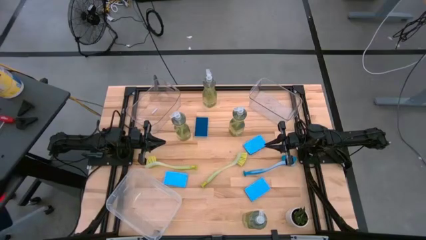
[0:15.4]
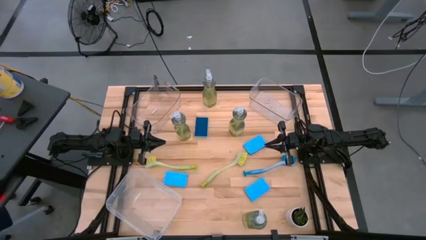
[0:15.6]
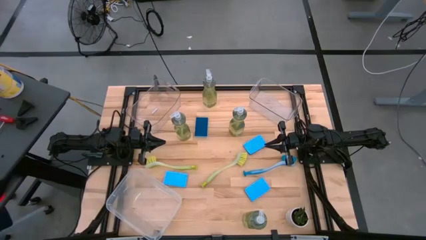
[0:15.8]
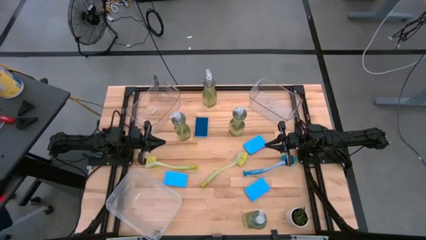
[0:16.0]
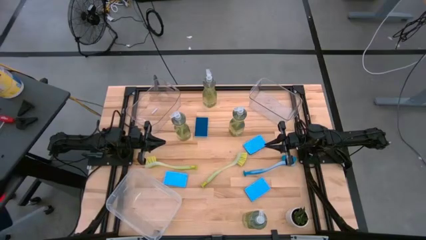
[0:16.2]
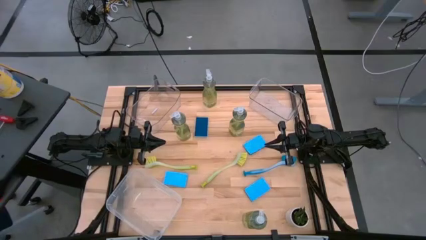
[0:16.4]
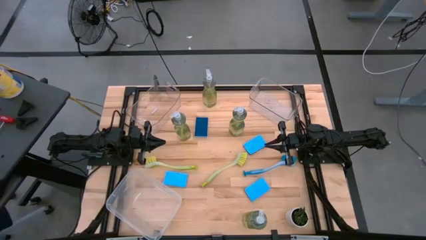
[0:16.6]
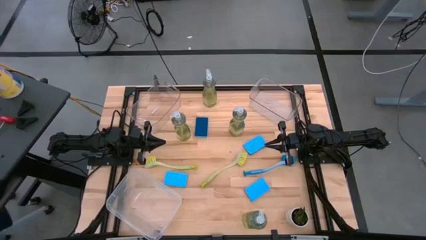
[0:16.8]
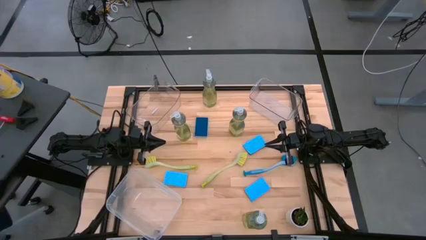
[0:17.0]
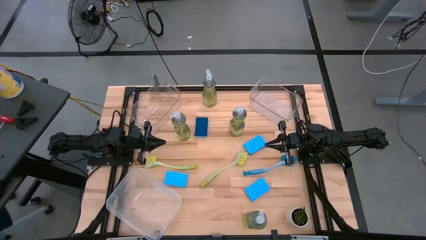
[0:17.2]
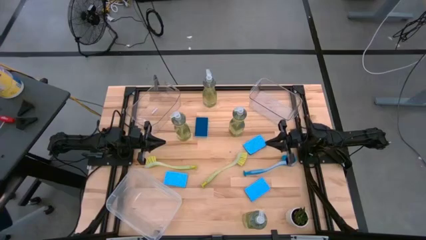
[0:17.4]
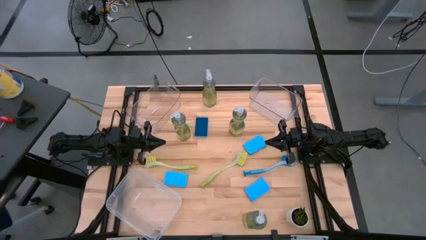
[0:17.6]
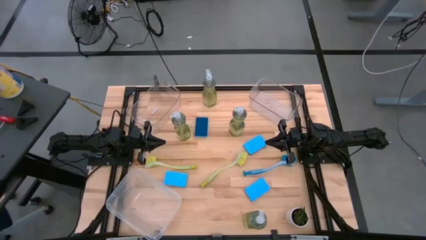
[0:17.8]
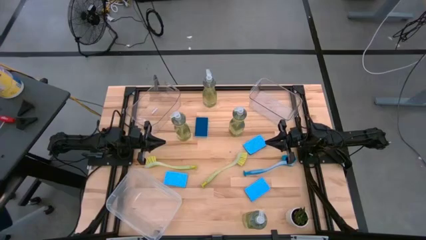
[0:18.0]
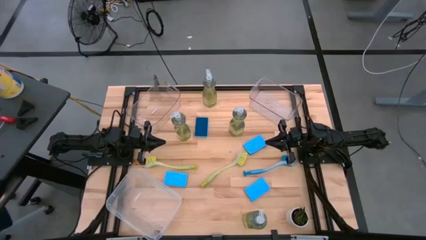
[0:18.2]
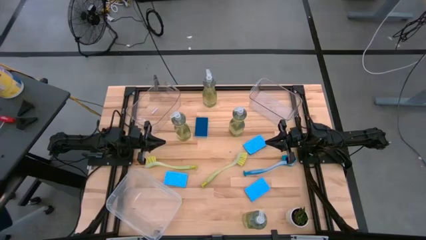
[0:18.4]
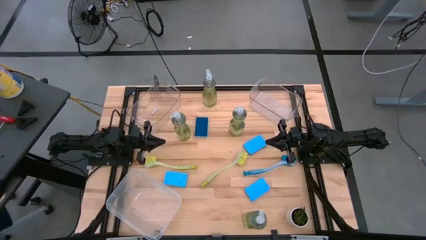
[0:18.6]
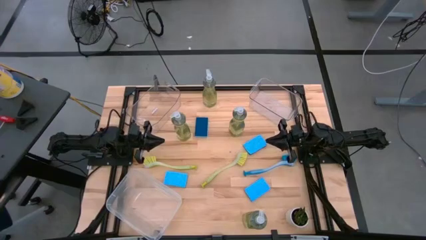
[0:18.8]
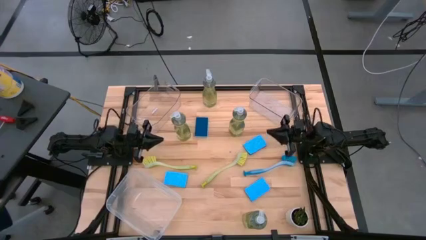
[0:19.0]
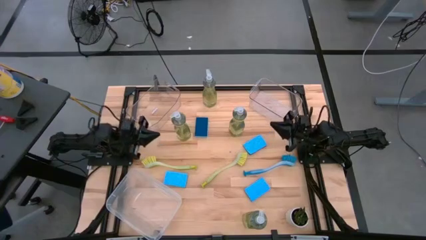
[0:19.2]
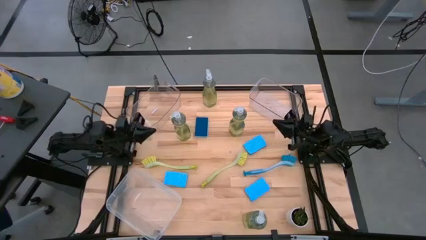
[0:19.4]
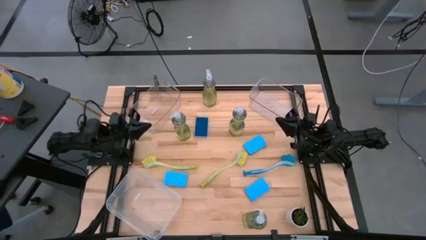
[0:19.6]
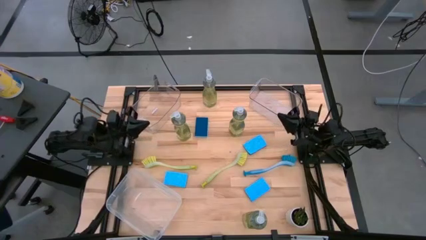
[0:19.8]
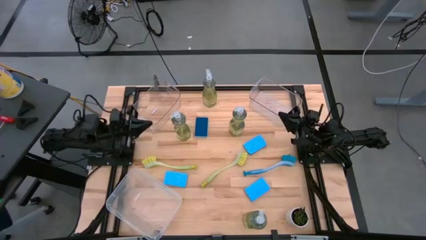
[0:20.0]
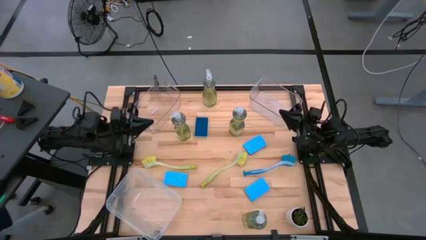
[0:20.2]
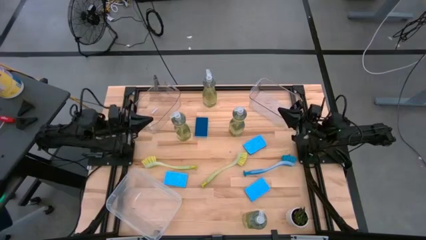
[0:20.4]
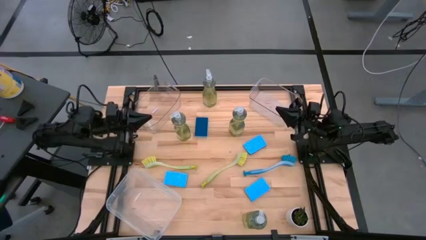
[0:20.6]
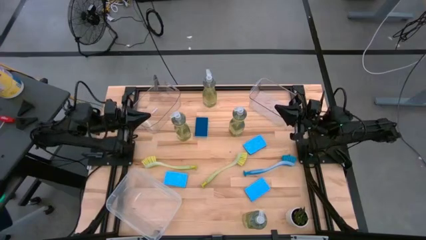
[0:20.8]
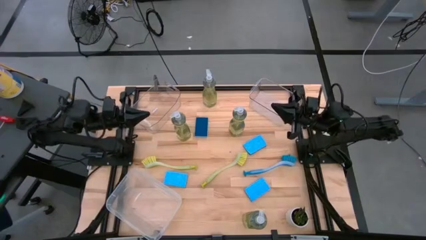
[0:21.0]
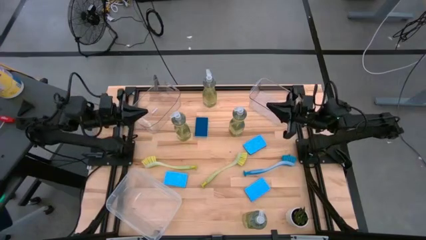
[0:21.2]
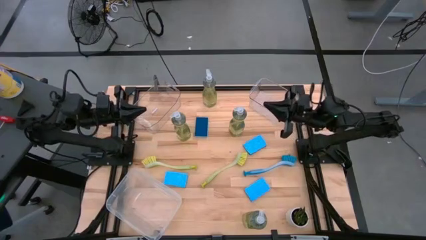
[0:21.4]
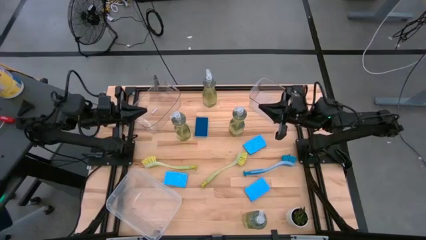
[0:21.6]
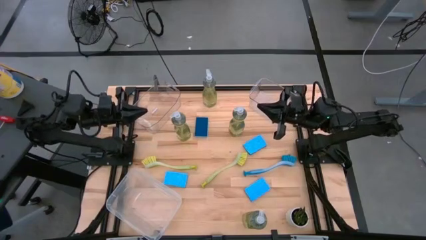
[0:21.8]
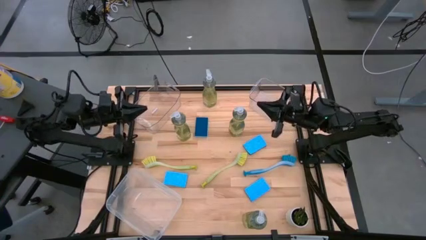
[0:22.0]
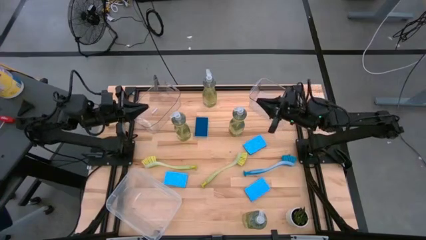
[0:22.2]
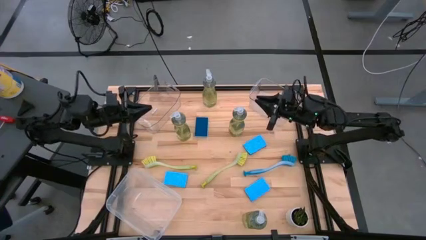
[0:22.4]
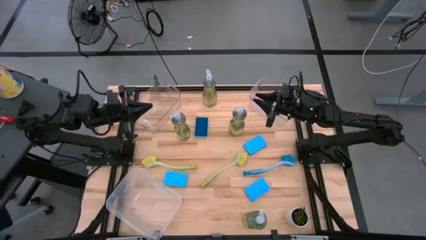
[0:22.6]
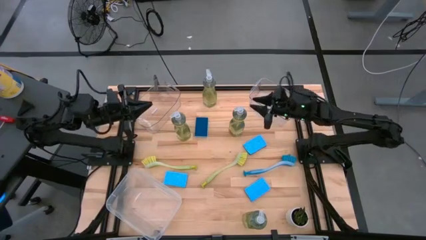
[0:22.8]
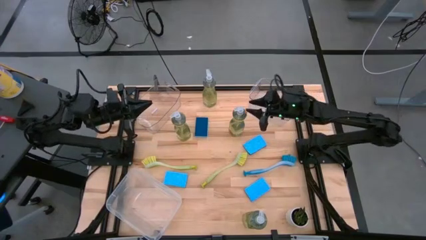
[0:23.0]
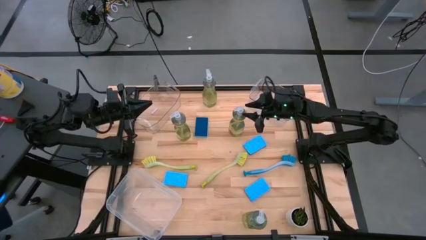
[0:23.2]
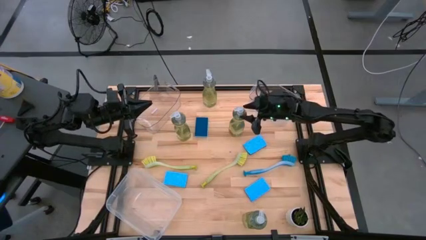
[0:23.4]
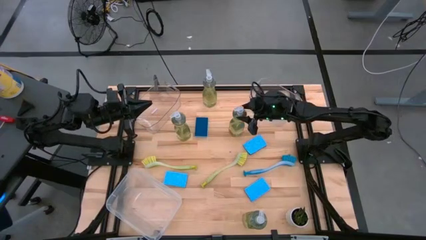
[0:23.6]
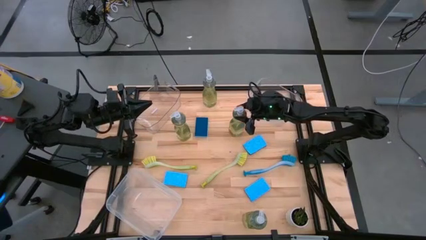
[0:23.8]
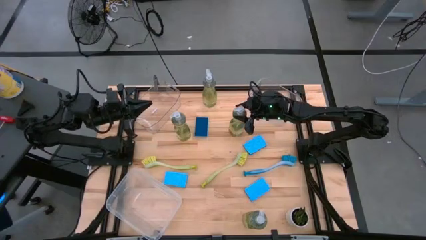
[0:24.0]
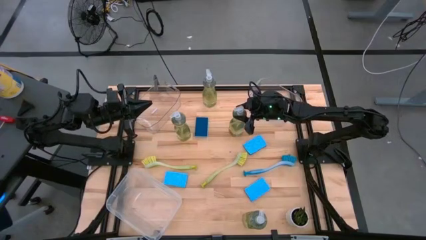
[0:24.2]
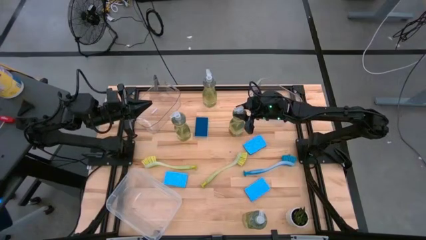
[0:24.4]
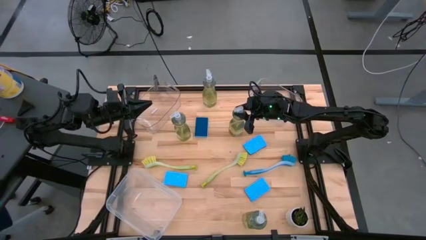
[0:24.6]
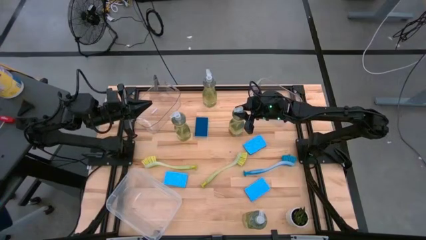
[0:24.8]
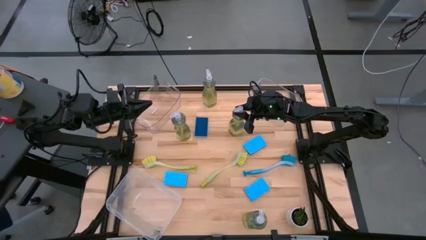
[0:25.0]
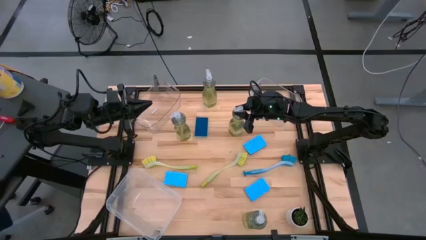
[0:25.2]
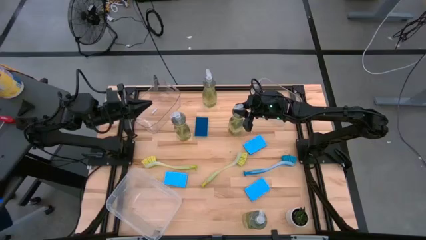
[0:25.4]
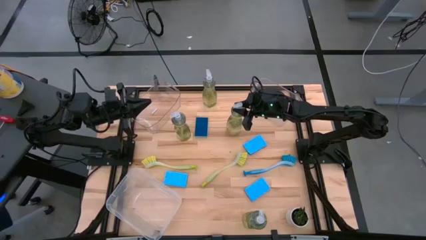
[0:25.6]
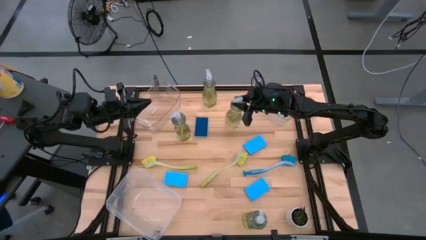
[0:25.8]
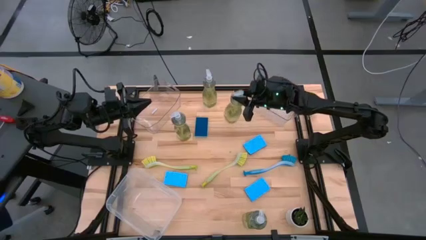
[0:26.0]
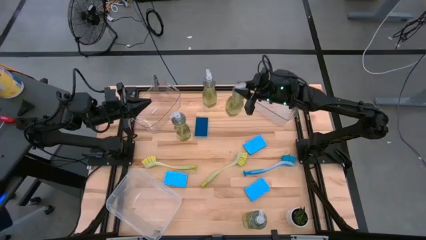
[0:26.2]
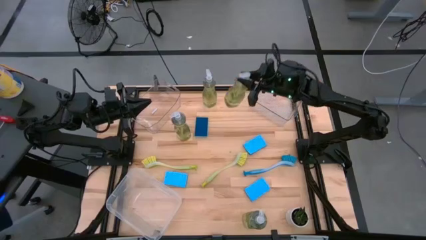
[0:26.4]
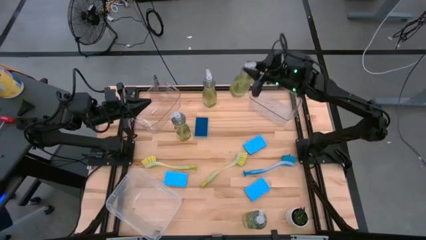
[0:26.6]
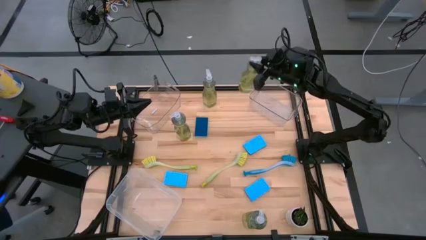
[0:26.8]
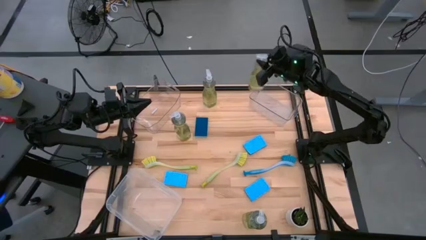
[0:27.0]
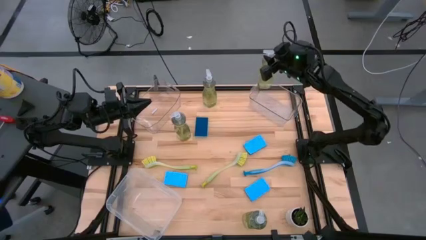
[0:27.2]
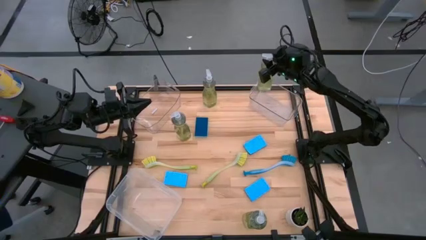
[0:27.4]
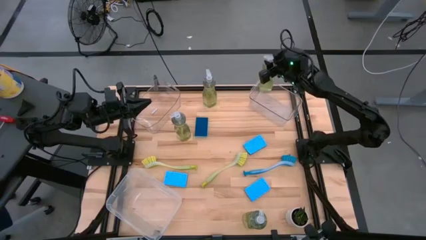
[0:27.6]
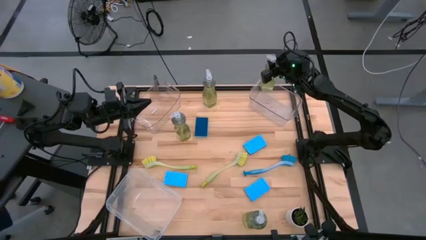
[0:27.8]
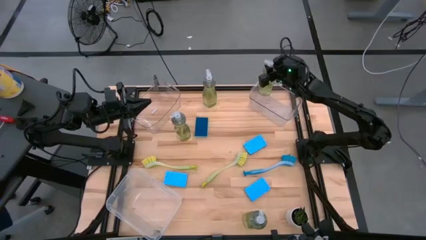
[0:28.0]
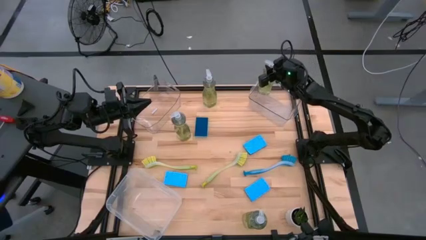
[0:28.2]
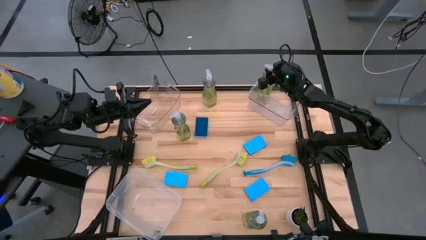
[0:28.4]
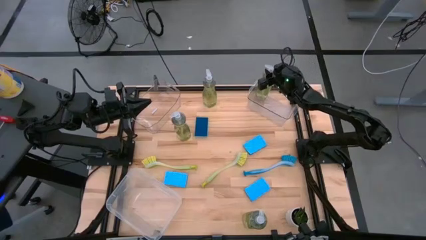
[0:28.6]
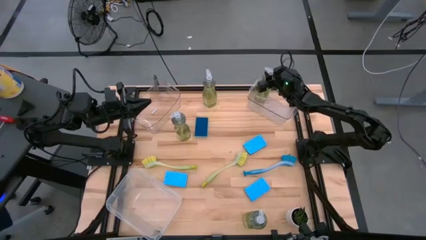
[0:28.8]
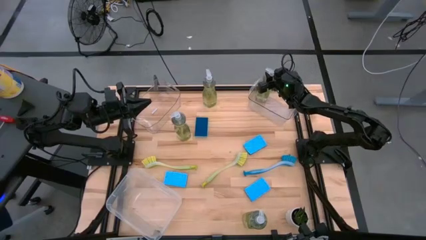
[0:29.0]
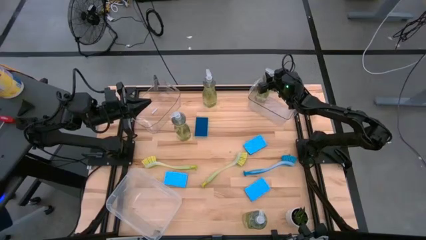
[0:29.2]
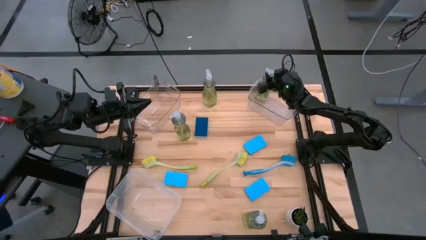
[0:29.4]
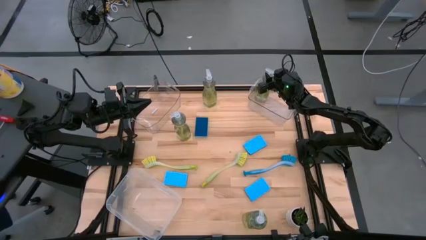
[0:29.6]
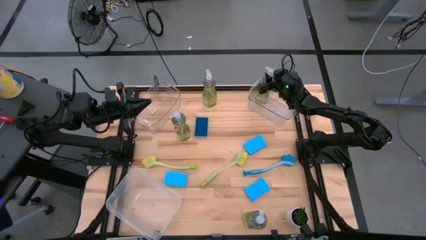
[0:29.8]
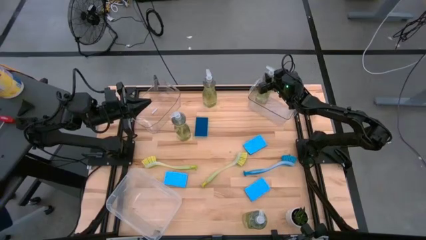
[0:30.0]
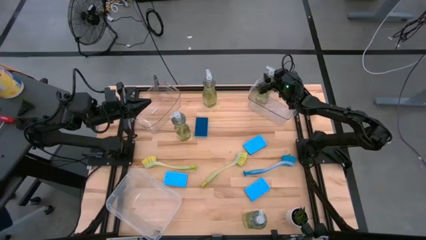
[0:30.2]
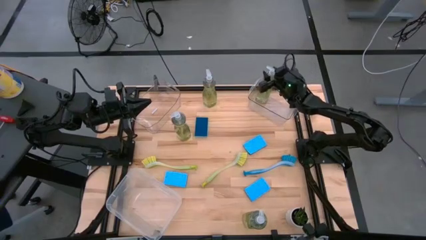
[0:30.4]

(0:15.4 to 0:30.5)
Task: Pick & Place Kitchen Sink Supplies
Put the yellow dish soap bottle into the right transparent bin
